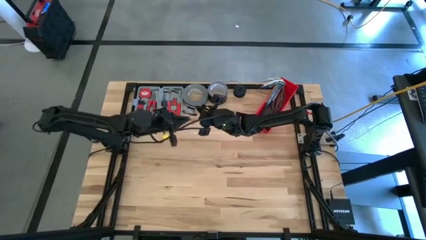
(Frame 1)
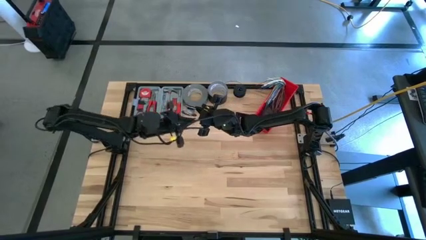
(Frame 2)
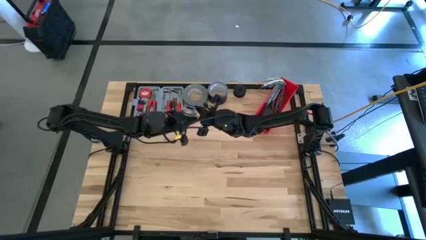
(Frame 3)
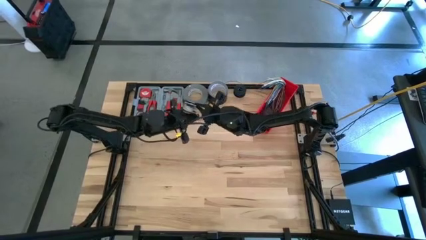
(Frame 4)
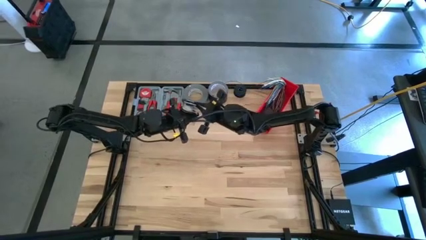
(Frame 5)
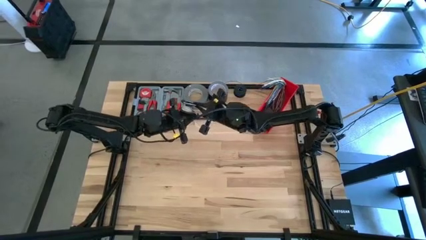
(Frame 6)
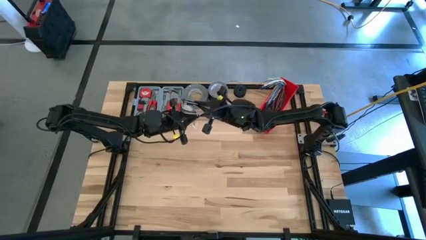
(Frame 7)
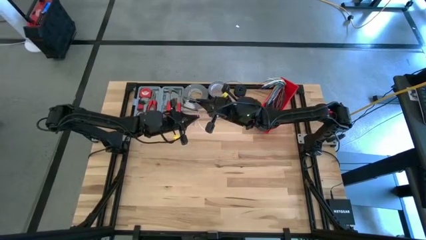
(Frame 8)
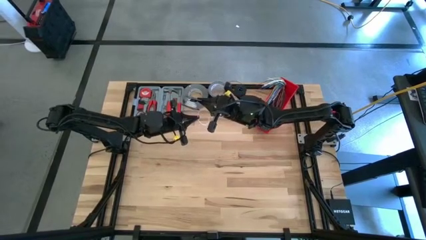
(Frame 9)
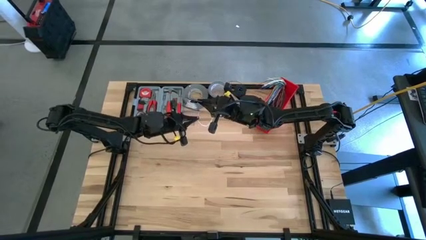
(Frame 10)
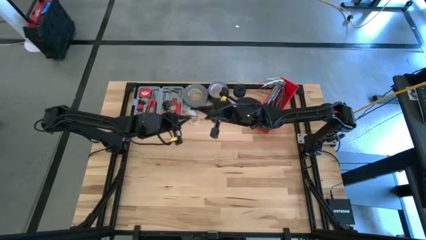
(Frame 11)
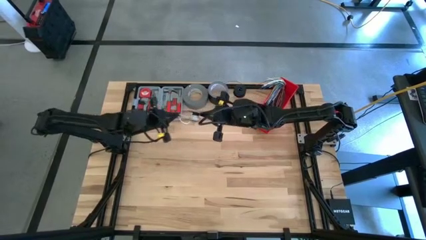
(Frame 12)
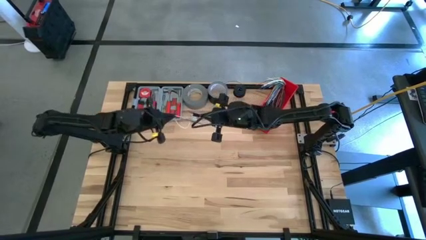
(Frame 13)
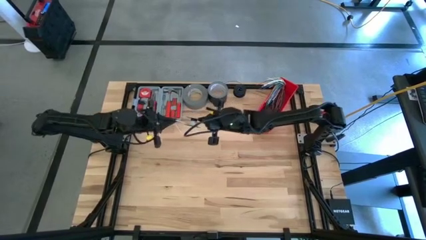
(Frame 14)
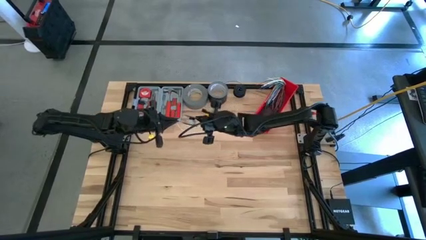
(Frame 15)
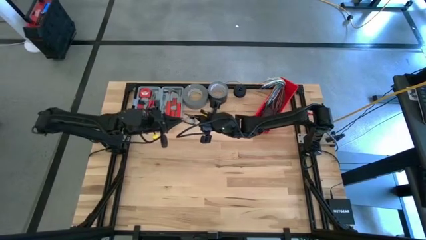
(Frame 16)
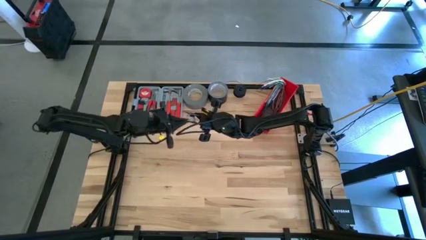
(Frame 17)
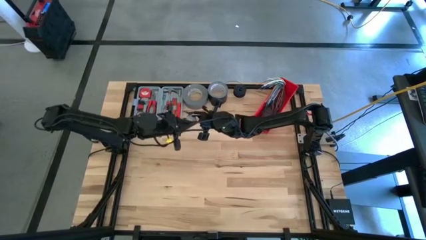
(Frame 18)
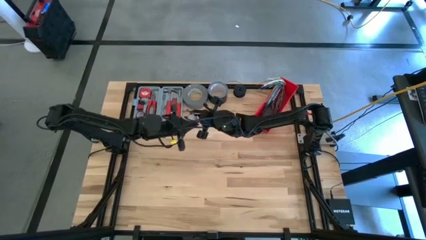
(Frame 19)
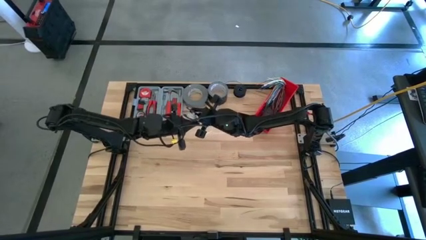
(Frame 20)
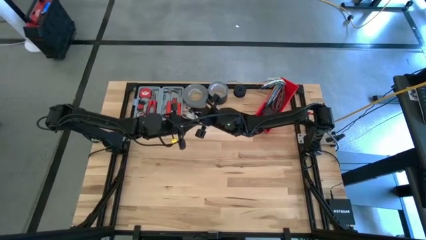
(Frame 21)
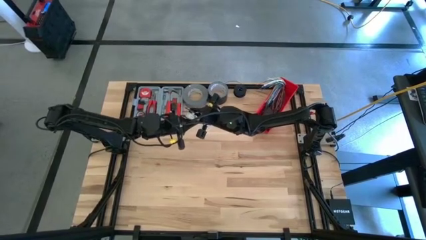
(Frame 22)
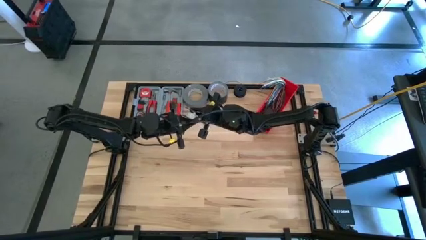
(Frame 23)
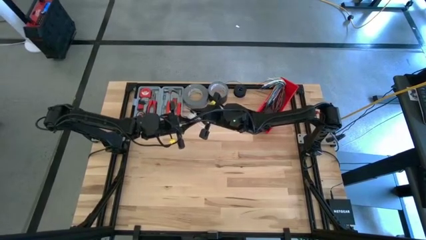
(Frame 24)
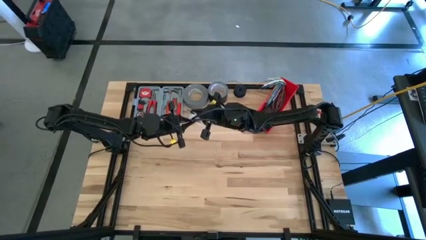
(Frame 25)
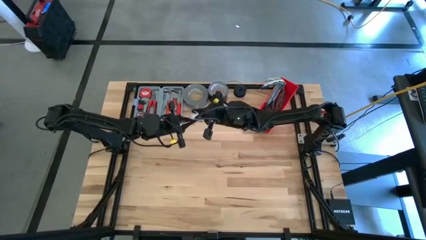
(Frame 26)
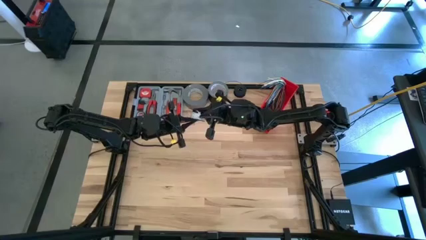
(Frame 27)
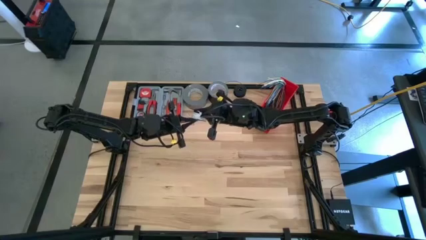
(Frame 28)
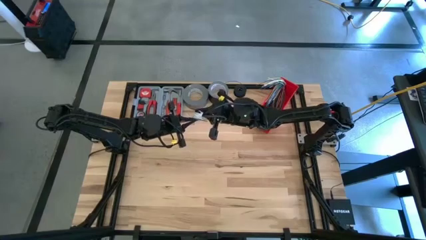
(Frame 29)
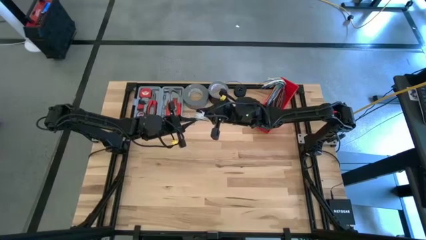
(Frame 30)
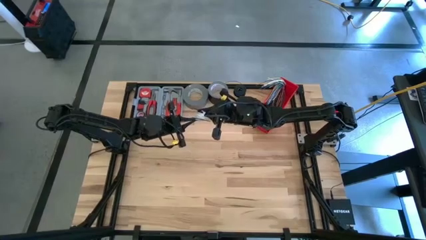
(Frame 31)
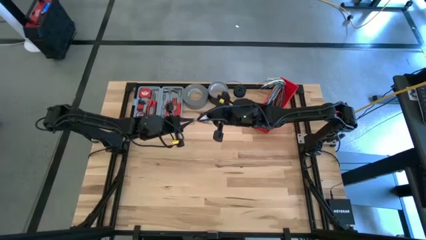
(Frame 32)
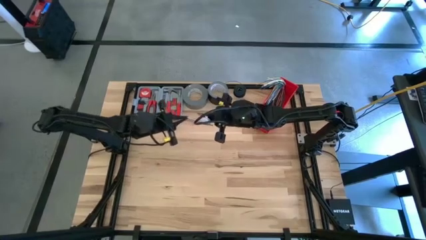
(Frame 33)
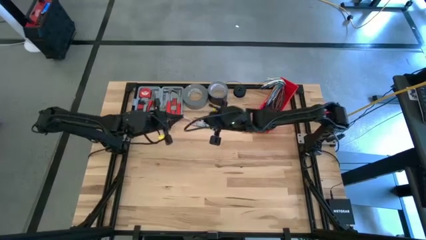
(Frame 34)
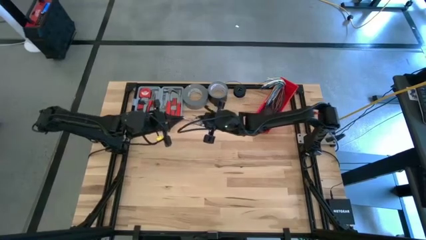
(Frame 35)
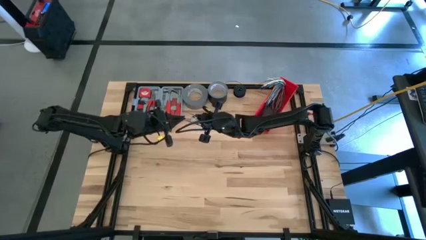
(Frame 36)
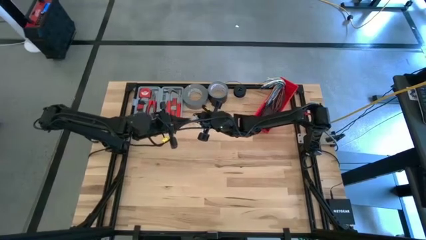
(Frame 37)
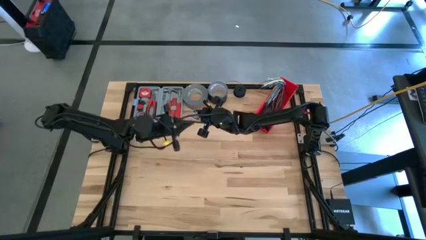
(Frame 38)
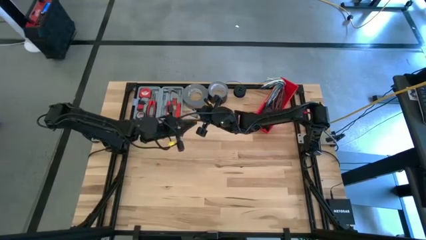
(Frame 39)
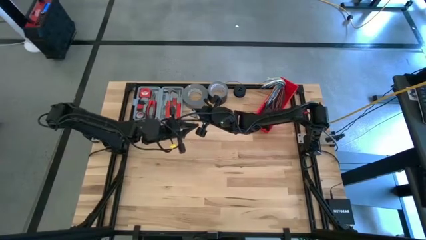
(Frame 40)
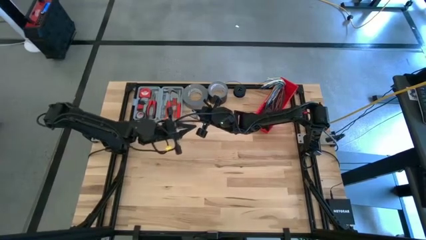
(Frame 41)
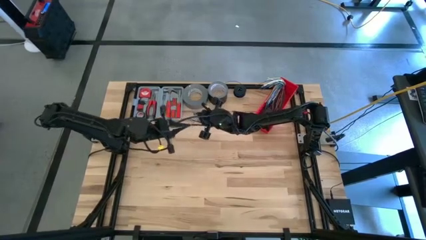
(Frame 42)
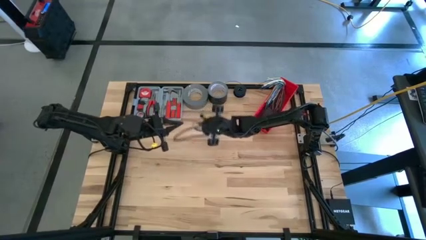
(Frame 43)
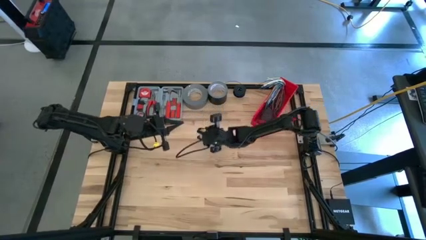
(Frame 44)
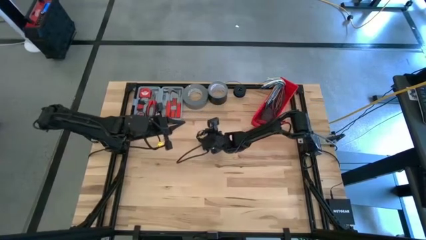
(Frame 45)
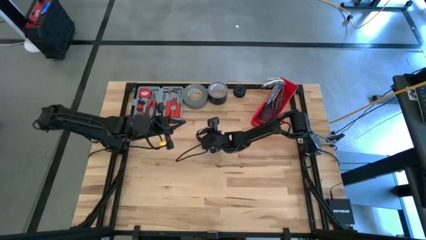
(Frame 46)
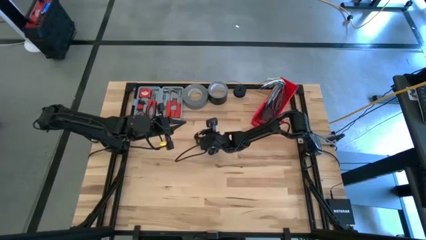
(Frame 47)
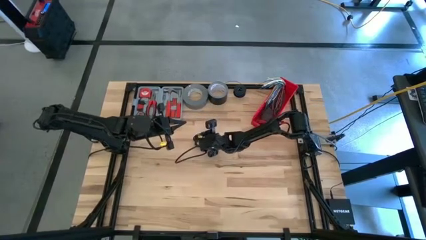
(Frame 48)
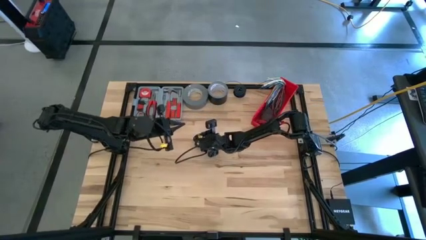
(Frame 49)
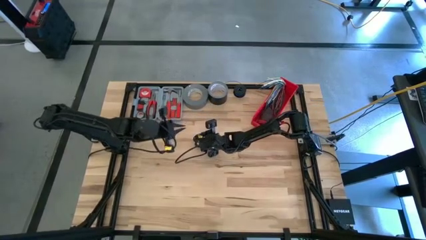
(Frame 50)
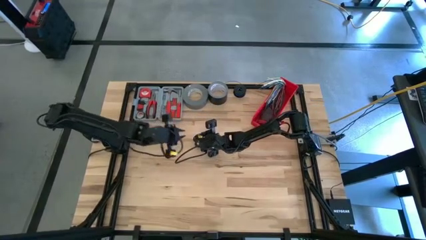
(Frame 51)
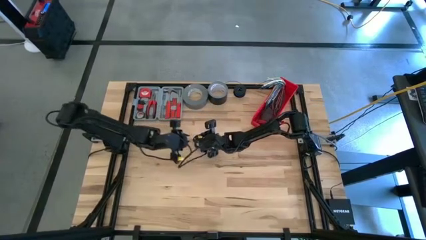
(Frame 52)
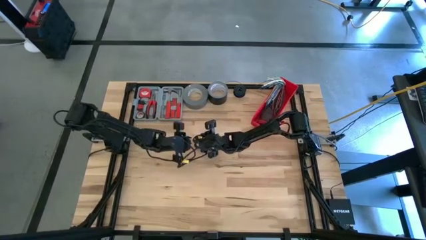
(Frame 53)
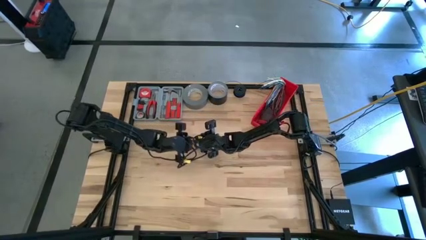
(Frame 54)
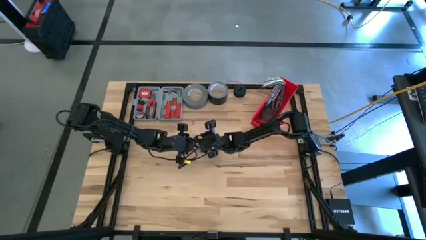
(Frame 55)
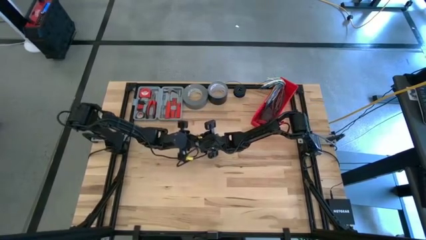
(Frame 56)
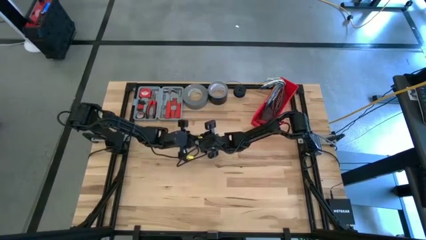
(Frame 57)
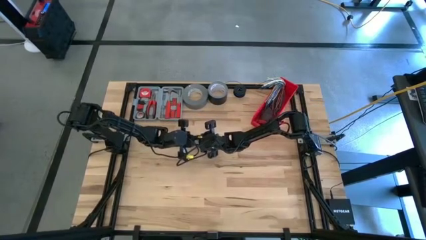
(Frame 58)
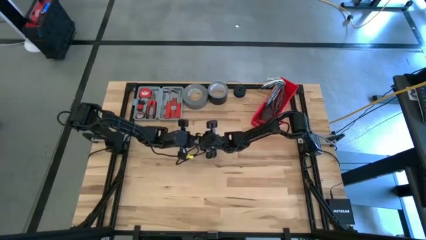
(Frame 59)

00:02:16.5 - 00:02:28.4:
Task: Coil cords
Coil the white wire onto the black spool
